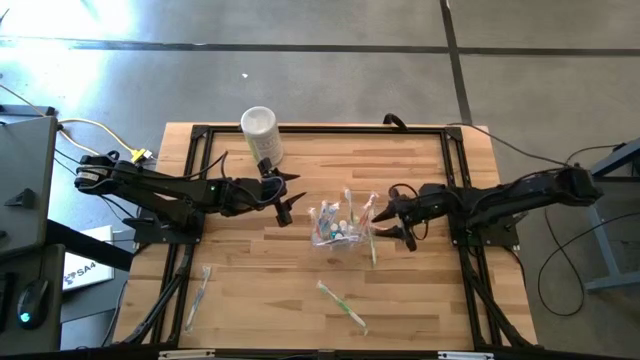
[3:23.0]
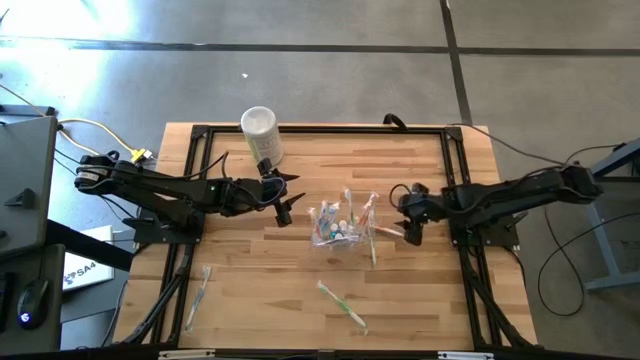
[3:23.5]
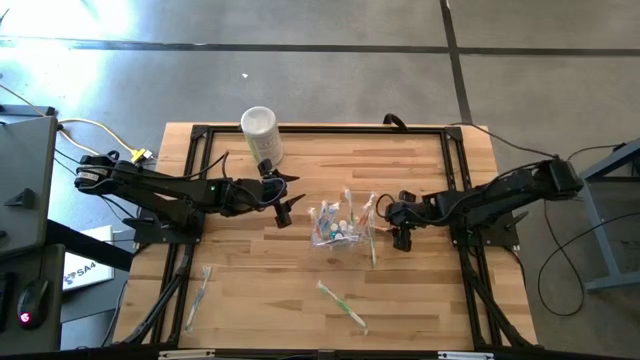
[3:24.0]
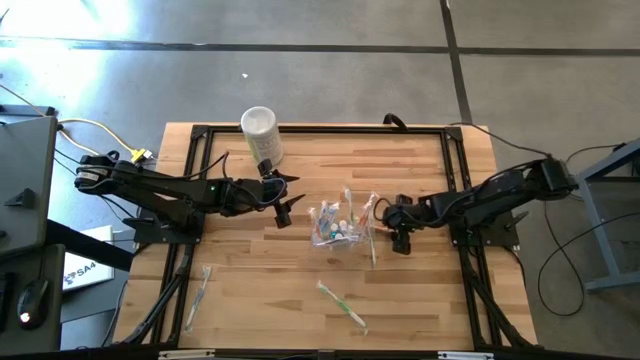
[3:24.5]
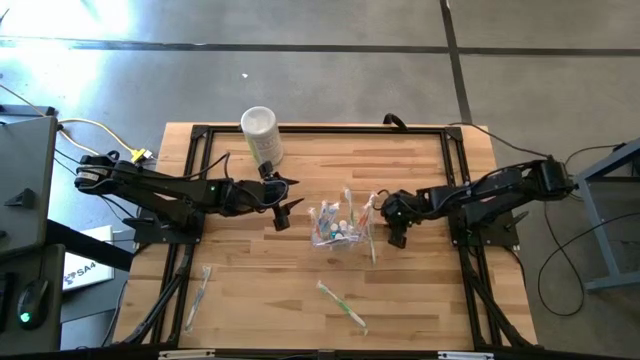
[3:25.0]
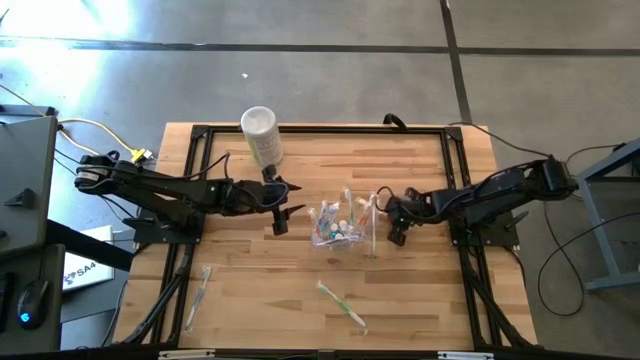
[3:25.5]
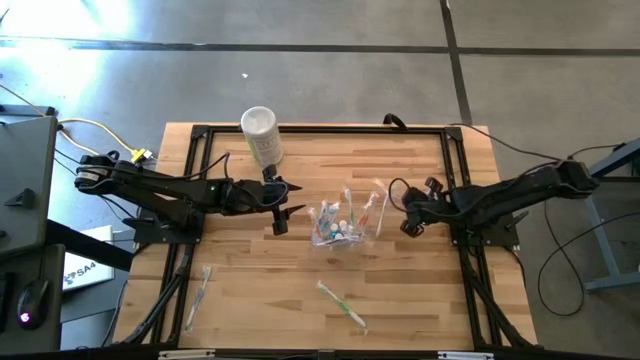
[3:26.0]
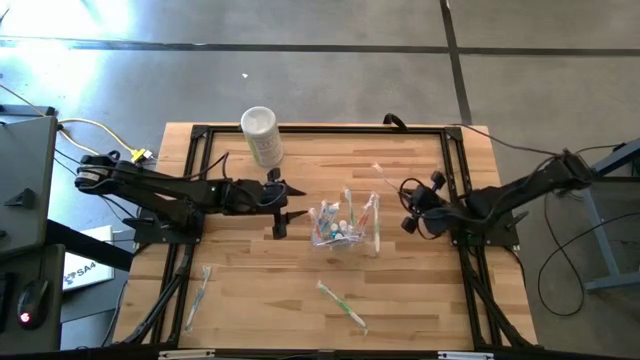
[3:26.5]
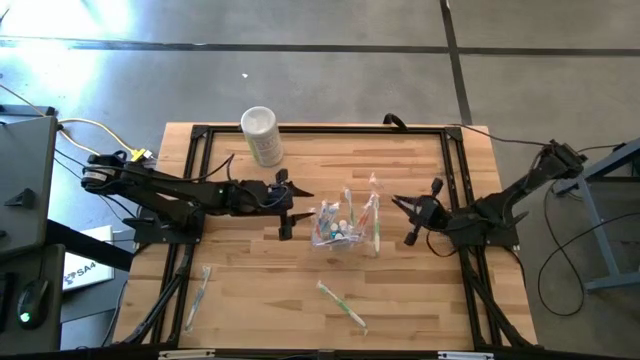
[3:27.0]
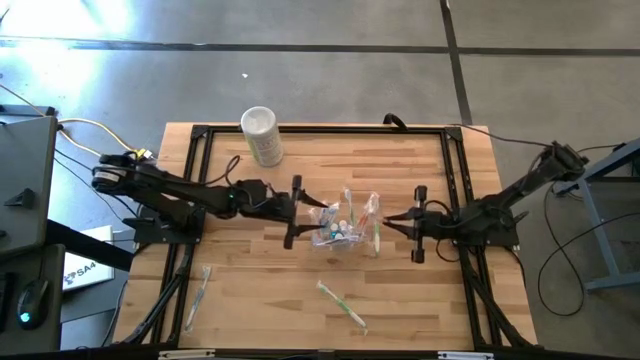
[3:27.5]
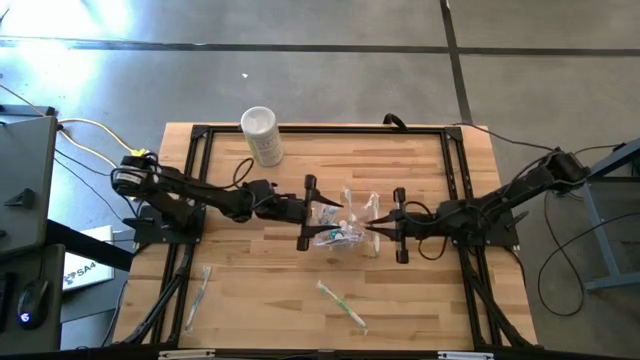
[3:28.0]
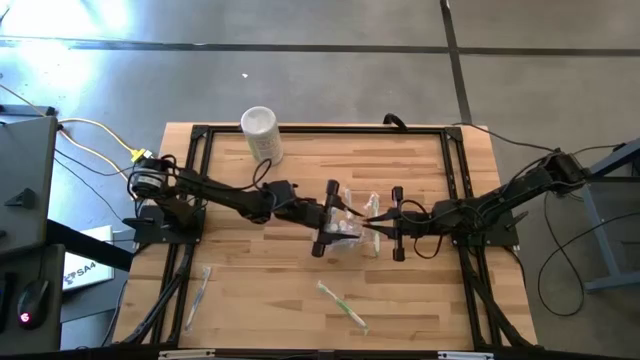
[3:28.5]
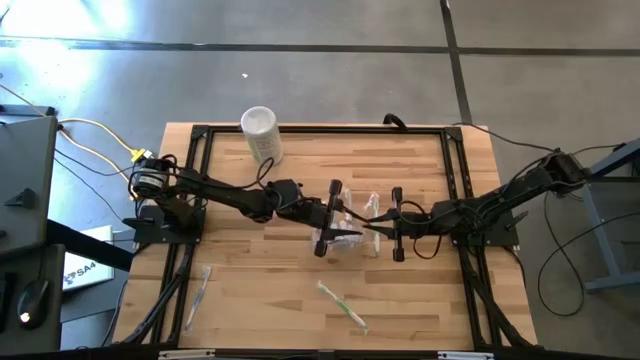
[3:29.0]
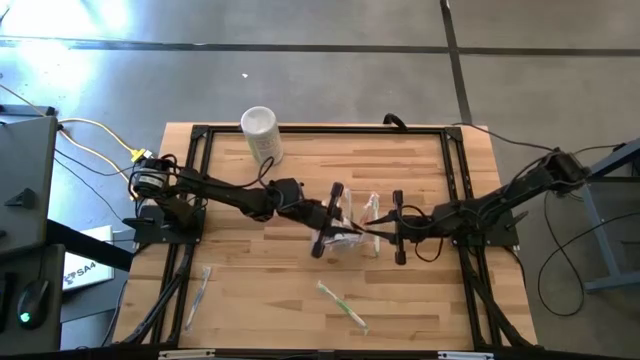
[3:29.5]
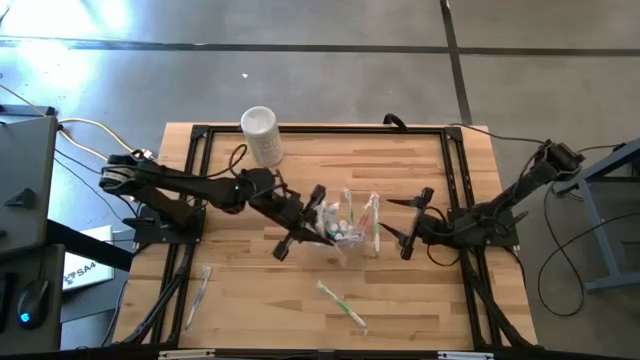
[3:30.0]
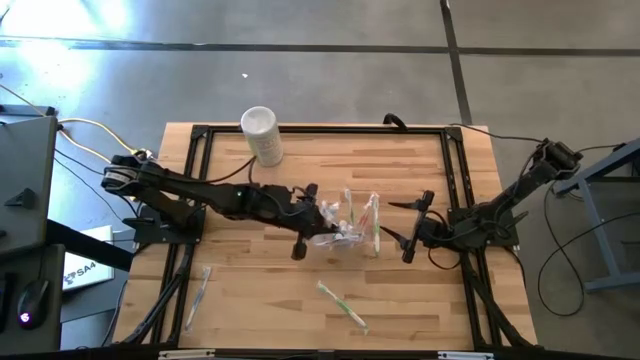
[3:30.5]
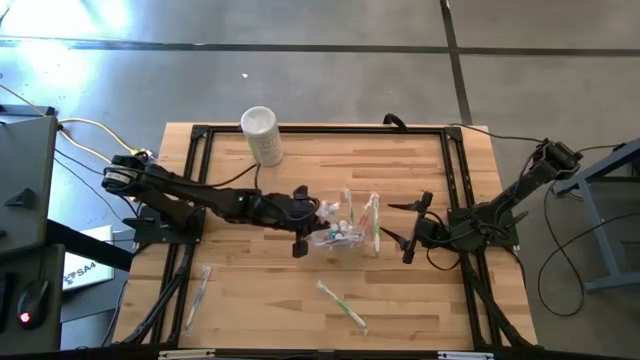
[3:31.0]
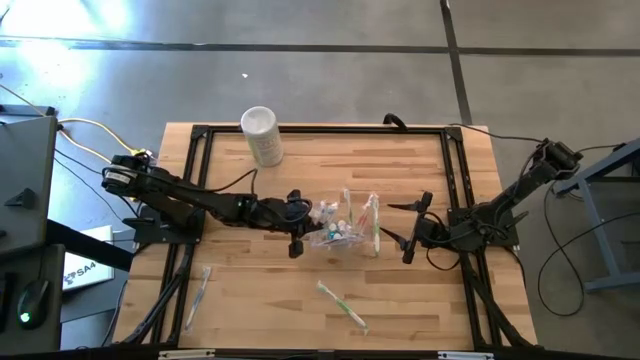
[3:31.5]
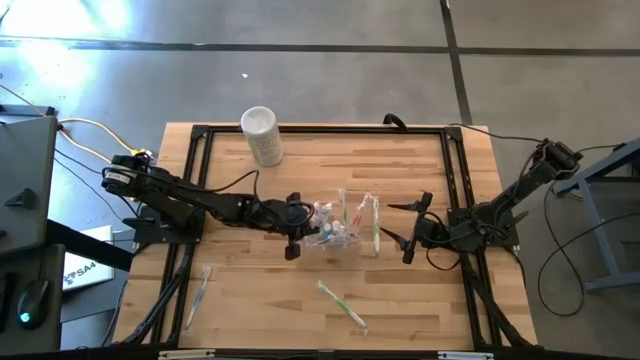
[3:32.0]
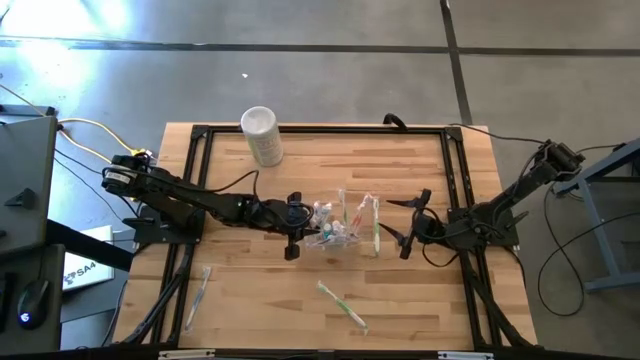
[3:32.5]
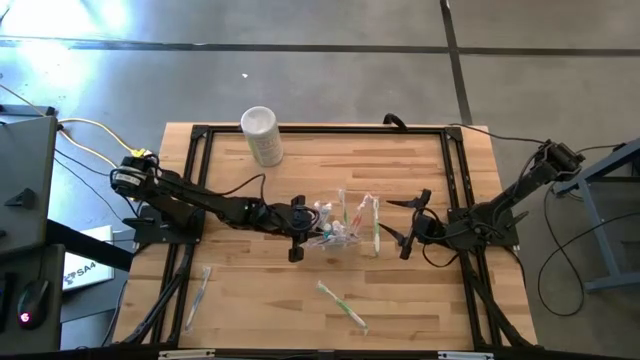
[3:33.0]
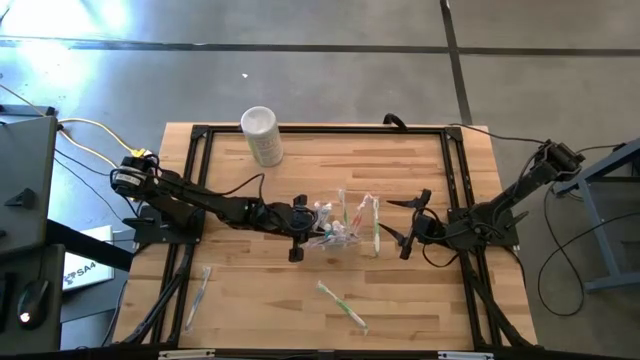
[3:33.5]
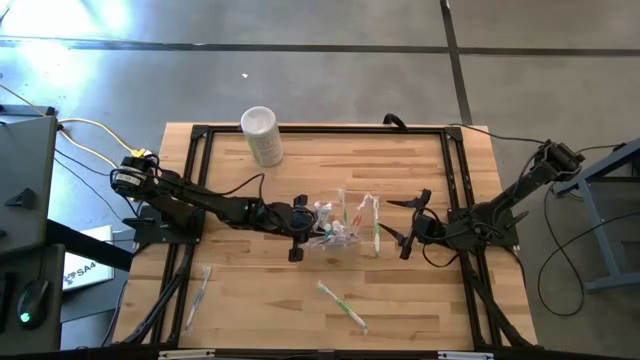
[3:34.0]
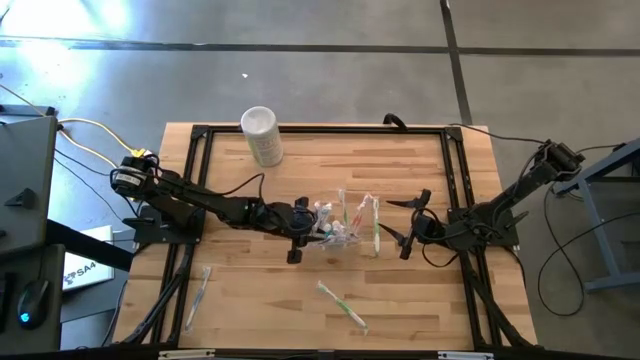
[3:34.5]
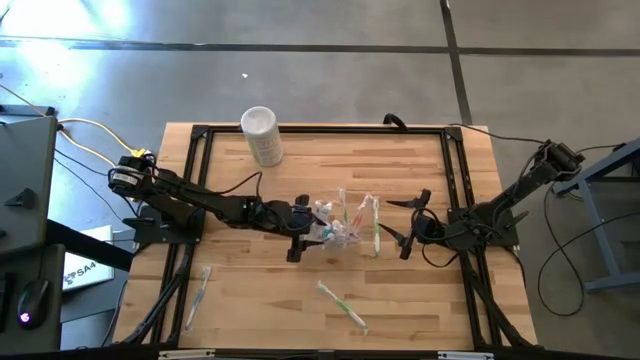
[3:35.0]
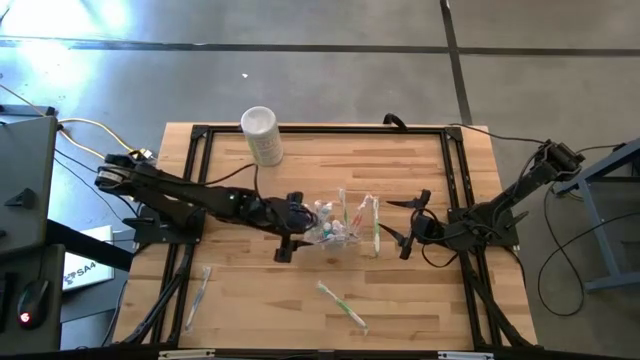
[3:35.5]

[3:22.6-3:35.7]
Task: Pick & Place toothbrushing station
Put the orange toothbrush into the left section of the transparent organizer

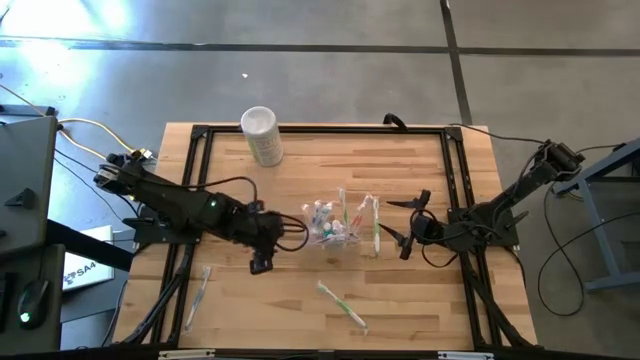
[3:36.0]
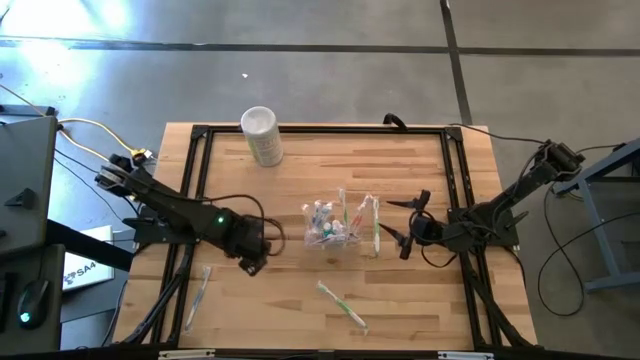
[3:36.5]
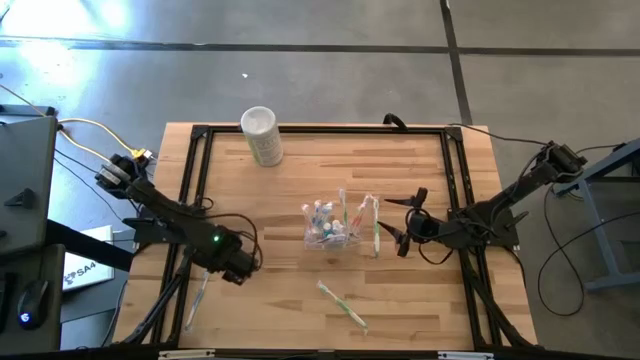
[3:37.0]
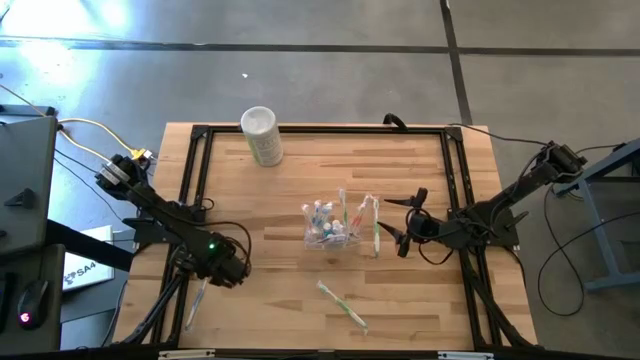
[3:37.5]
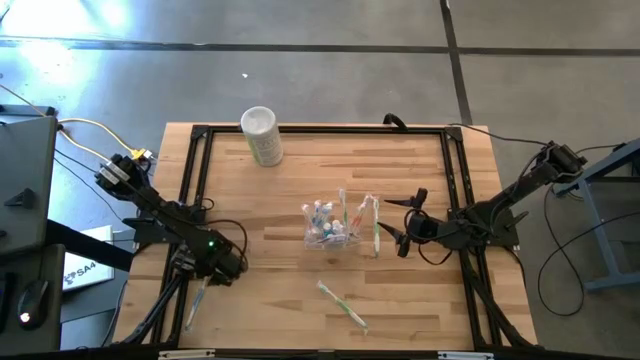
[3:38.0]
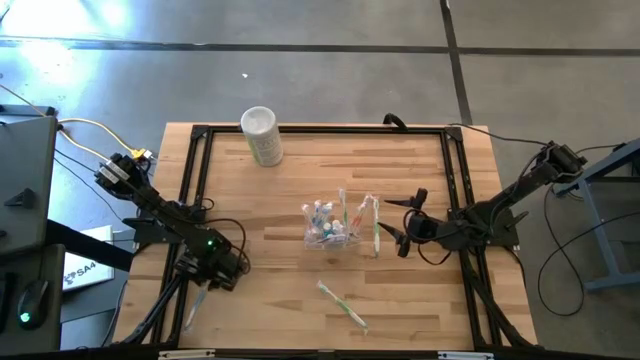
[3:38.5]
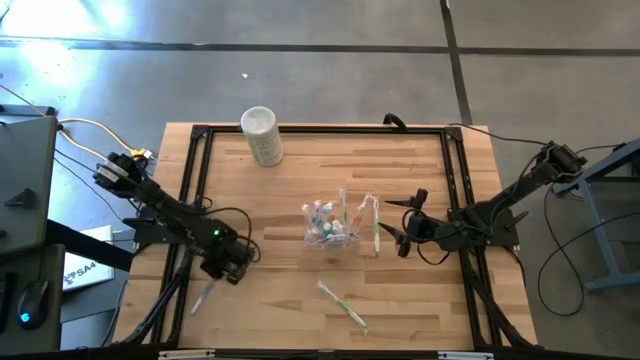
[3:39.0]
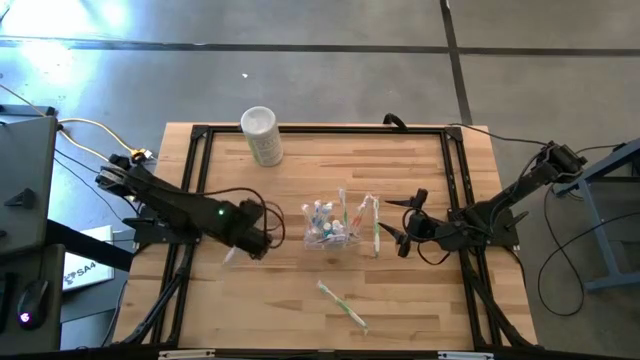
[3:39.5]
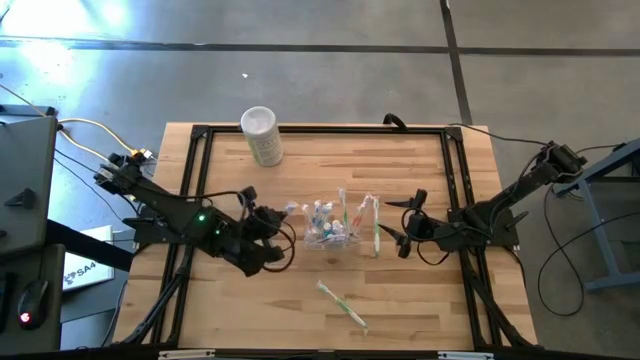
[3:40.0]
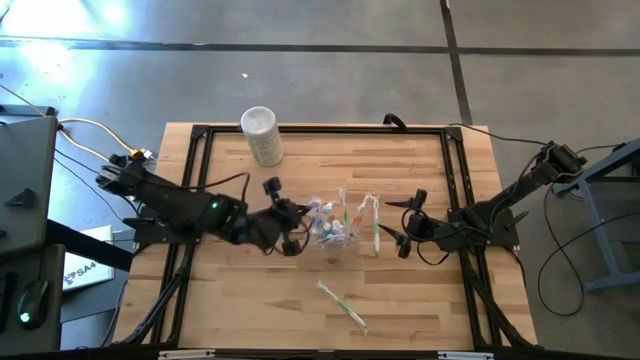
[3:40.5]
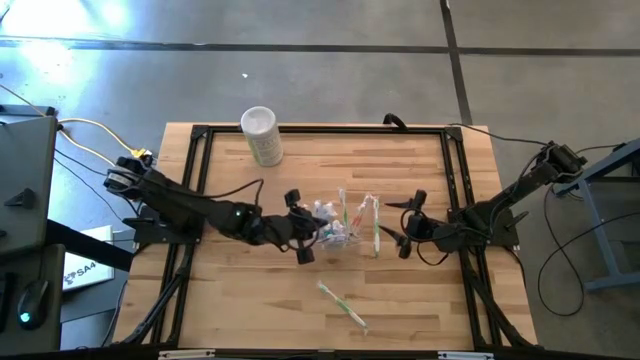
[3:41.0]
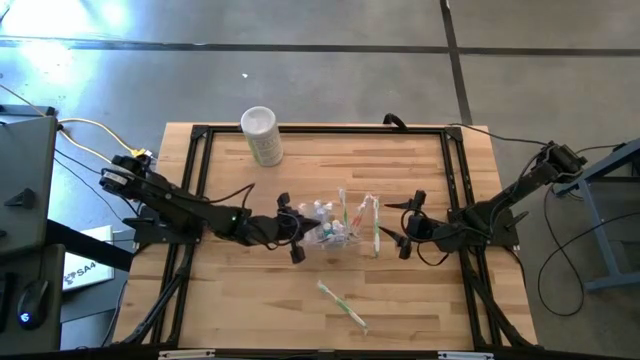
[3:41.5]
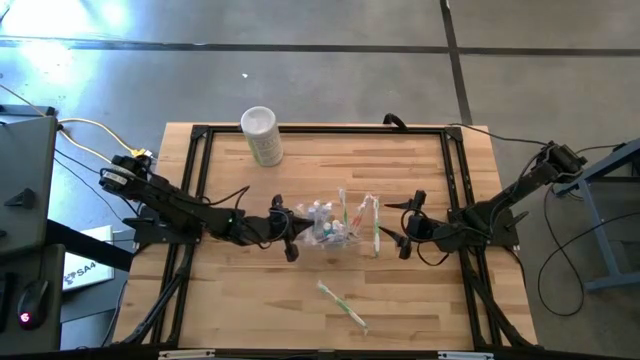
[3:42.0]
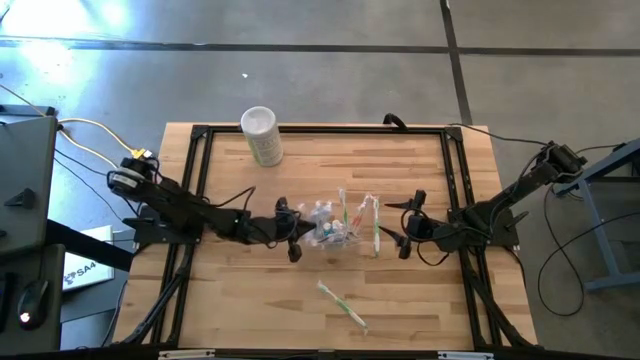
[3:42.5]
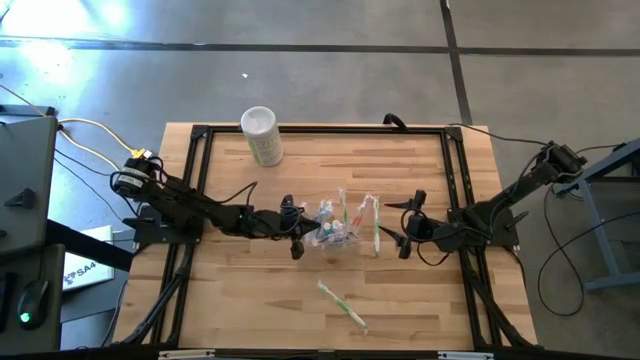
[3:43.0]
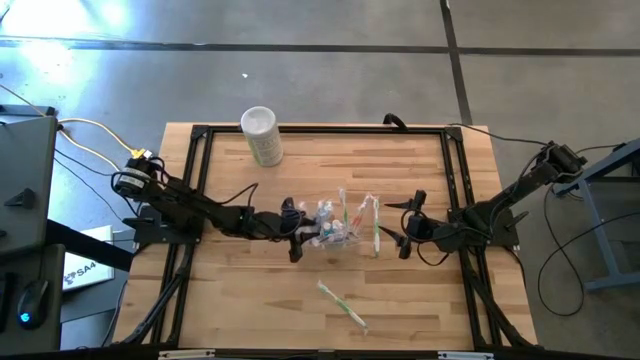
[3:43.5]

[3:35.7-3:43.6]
Put the blue toothbrush into the left section of the transparent organizer
